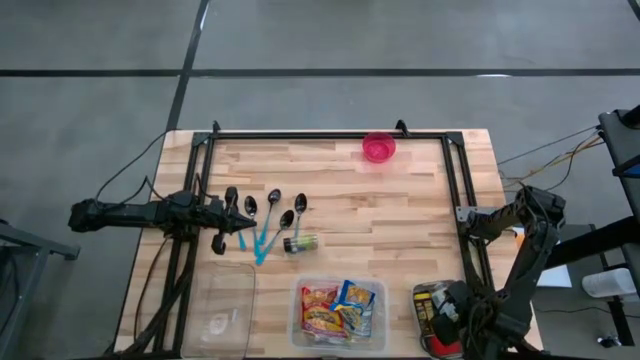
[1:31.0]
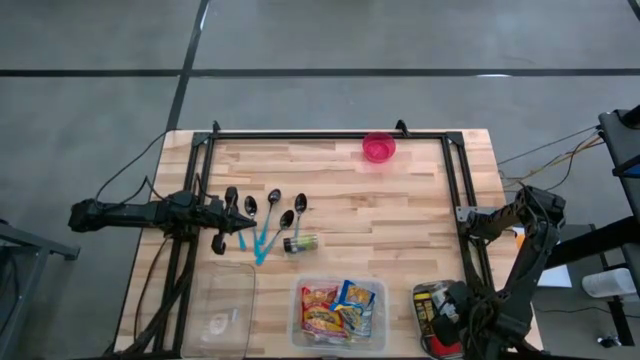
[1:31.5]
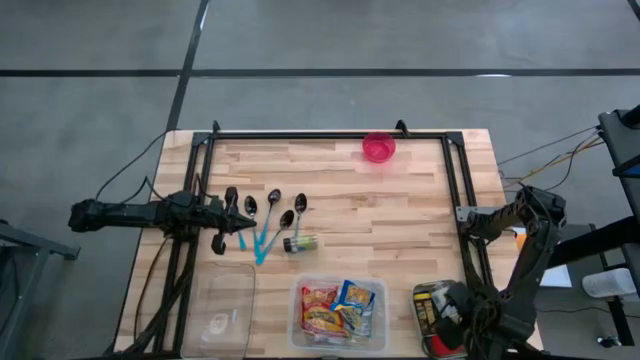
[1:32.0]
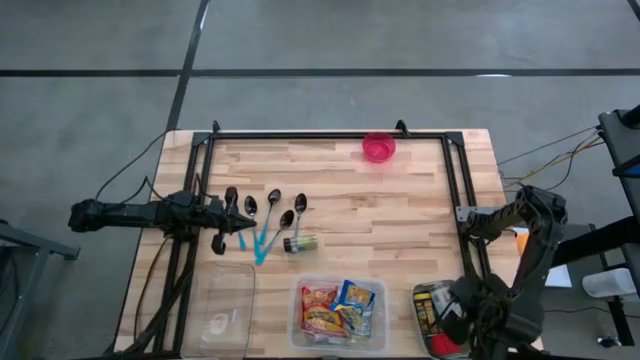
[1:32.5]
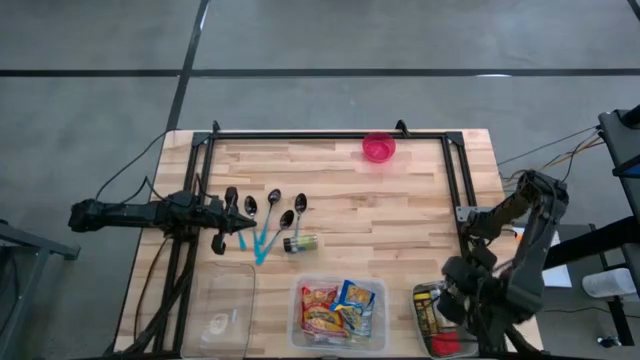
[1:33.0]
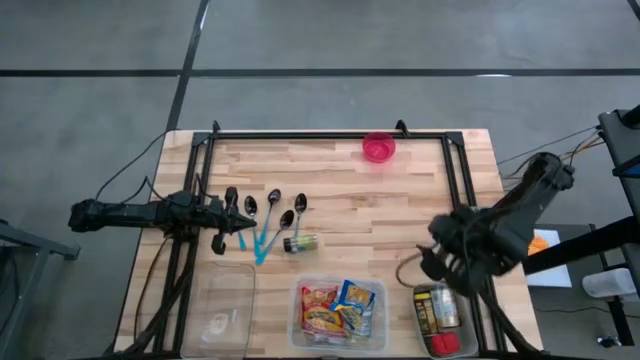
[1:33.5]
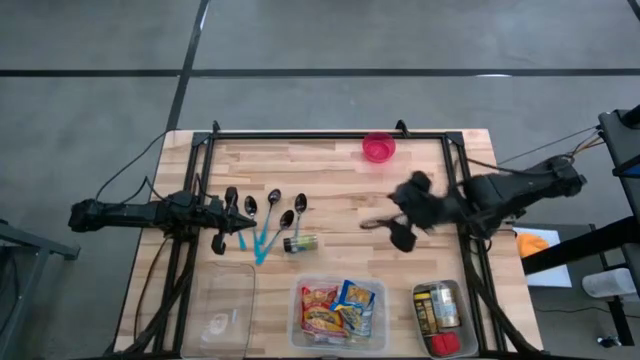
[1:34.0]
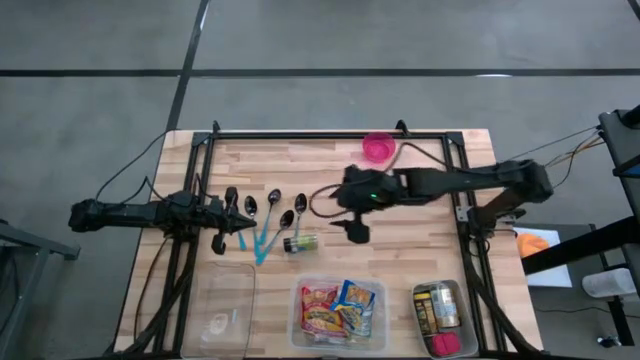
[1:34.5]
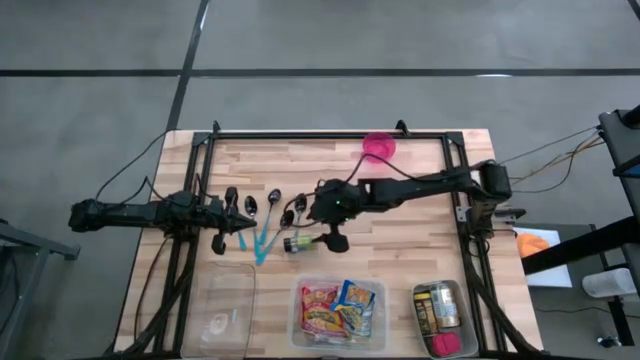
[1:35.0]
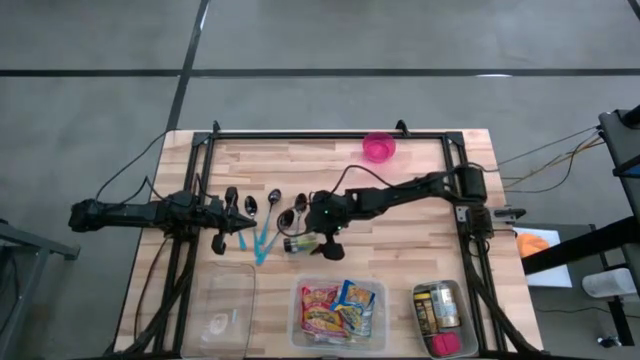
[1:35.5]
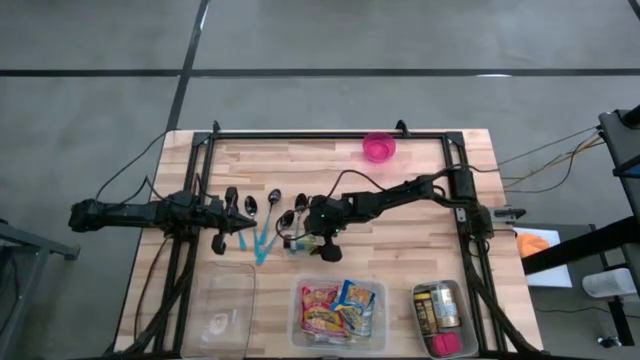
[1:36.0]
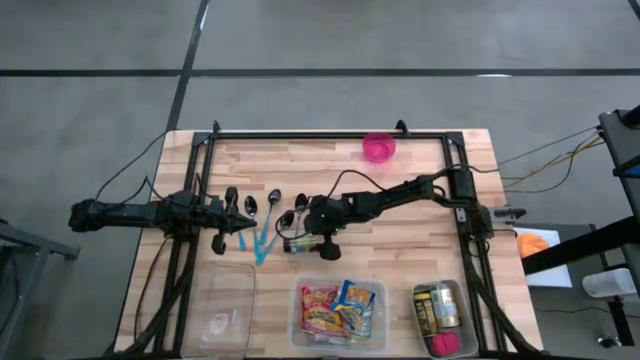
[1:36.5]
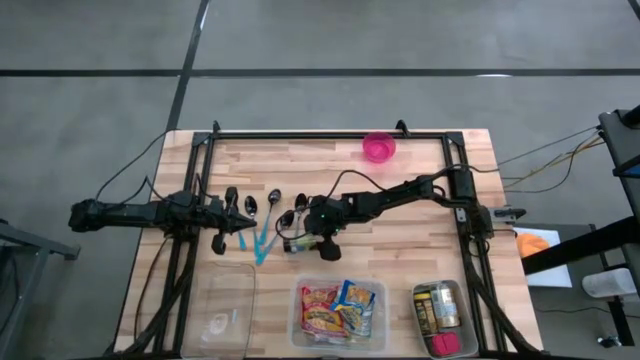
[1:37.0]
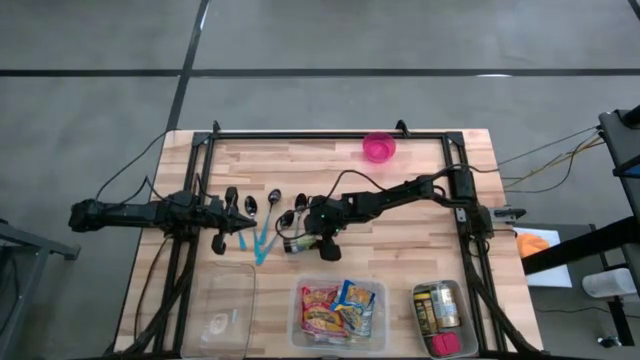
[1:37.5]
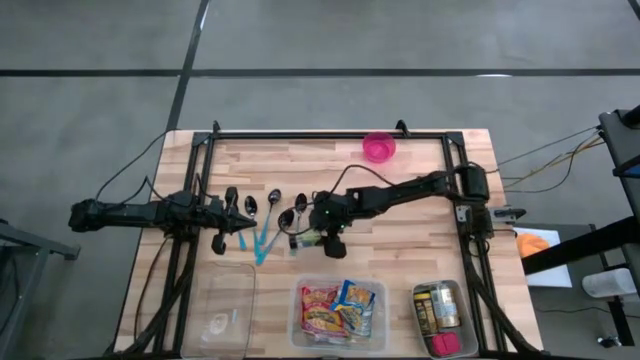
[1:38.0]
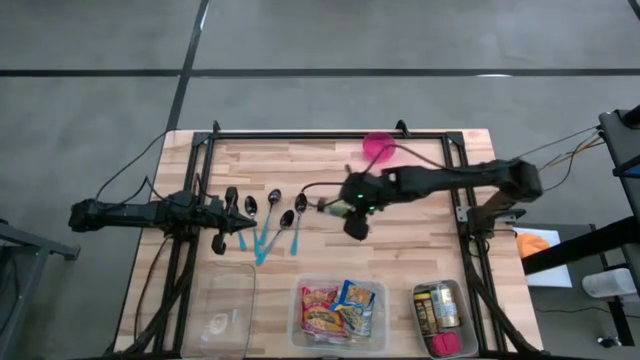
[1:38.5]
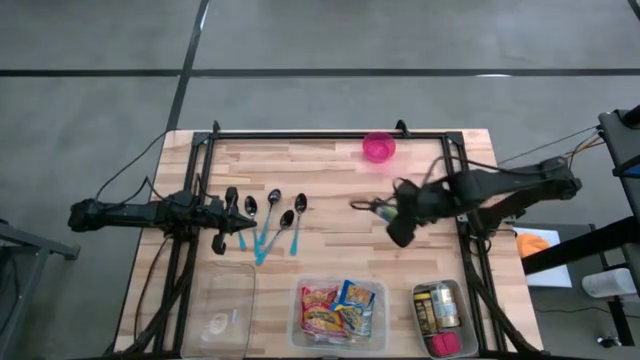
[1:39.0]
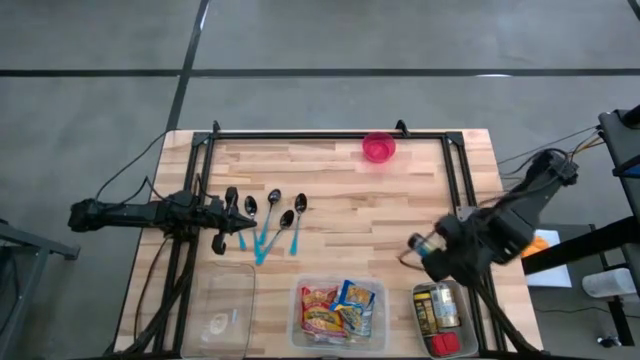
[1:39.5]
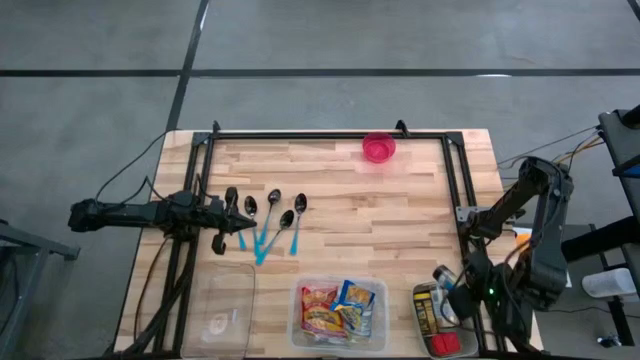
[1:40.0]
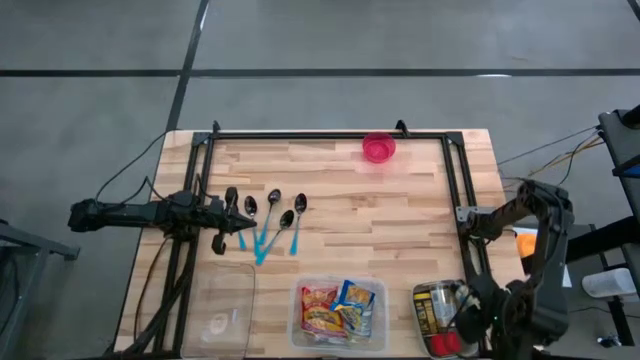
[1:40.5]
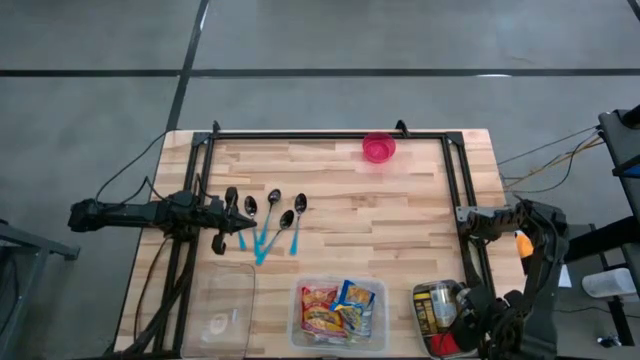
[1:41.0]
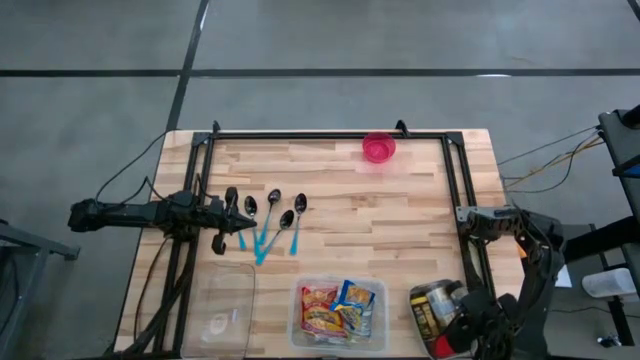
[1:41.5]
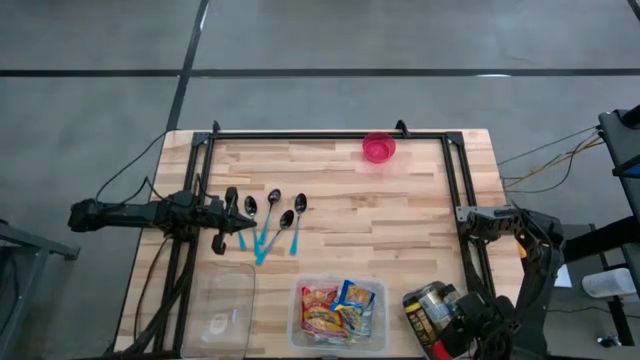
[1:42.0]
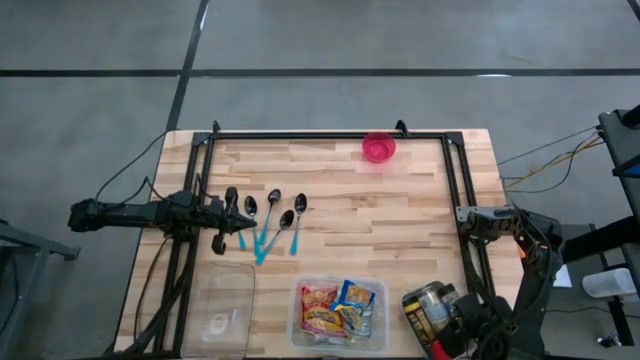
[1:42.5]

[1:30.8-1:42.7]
Put the green seasoning bottle into the gray bin

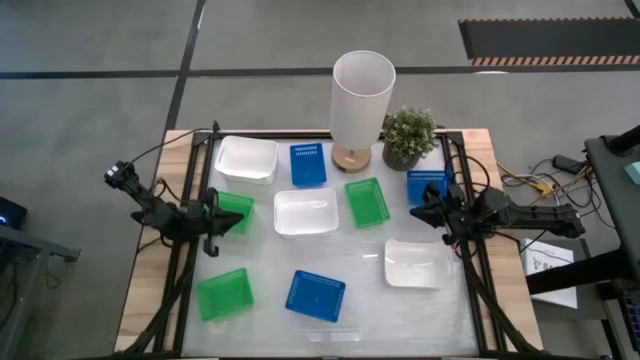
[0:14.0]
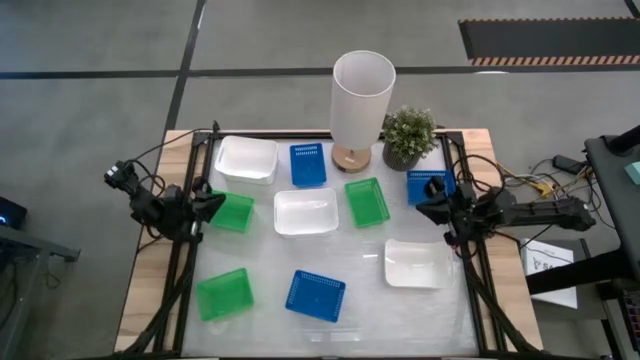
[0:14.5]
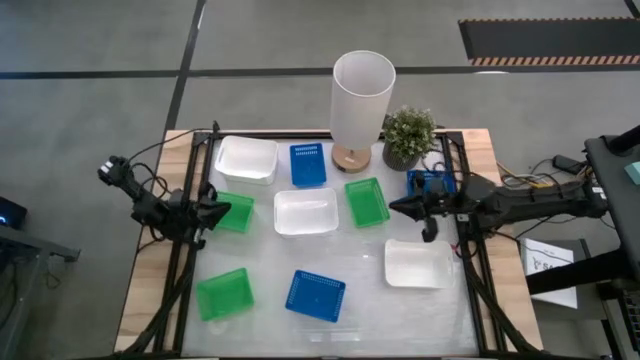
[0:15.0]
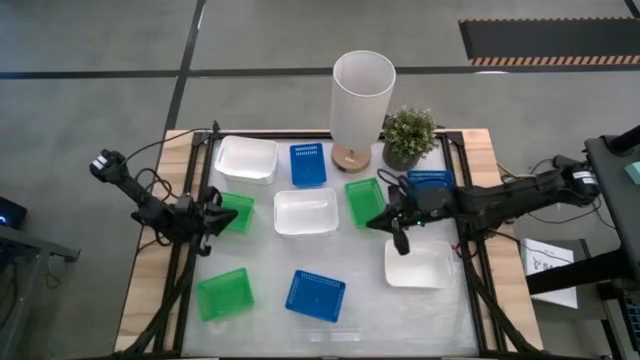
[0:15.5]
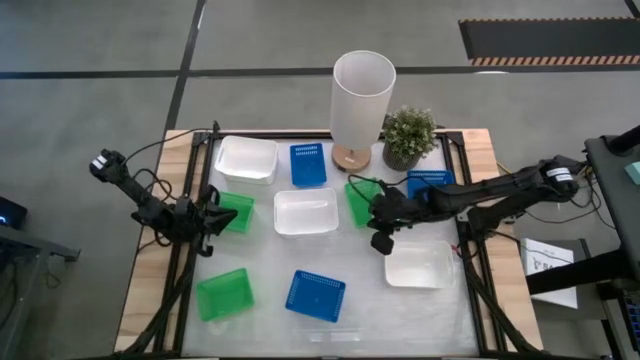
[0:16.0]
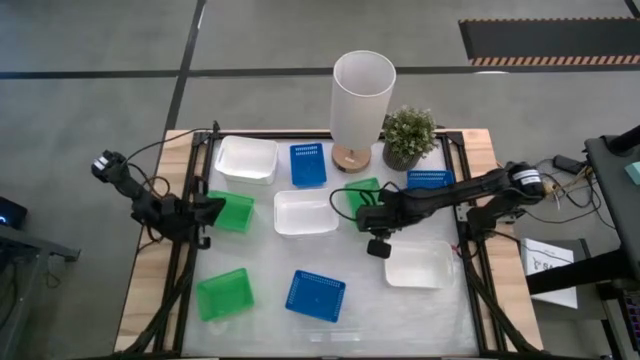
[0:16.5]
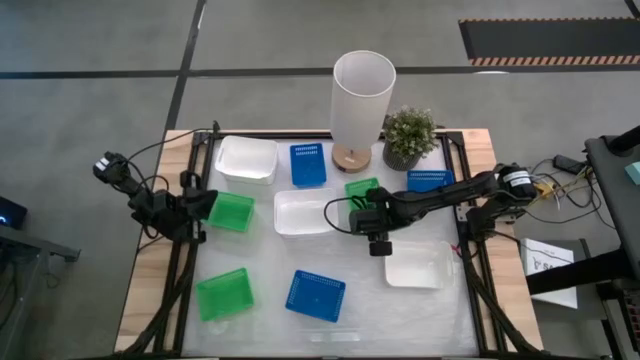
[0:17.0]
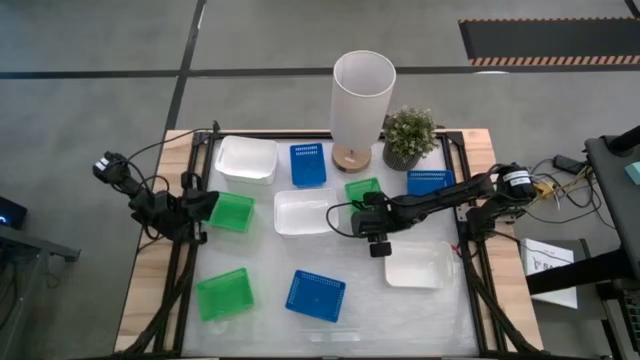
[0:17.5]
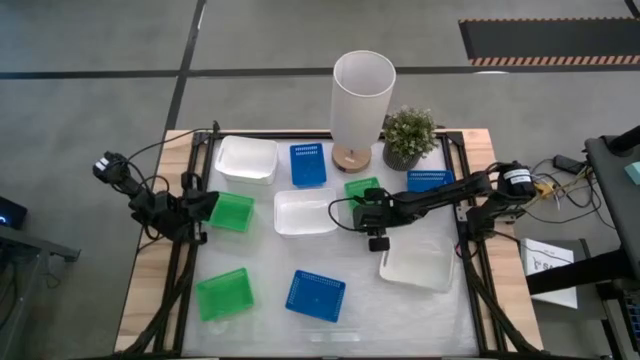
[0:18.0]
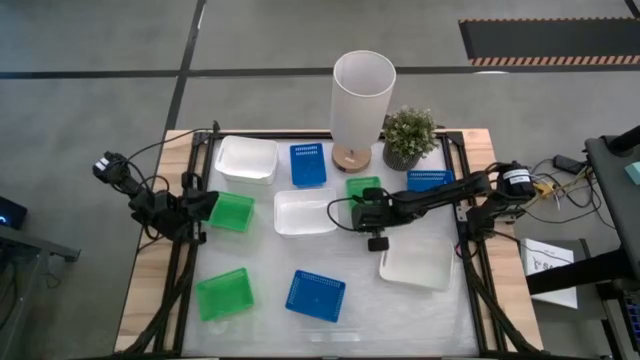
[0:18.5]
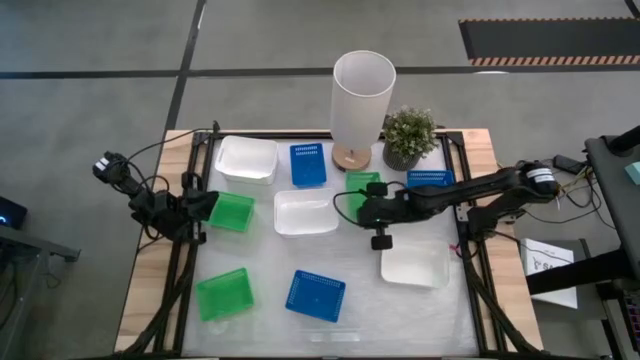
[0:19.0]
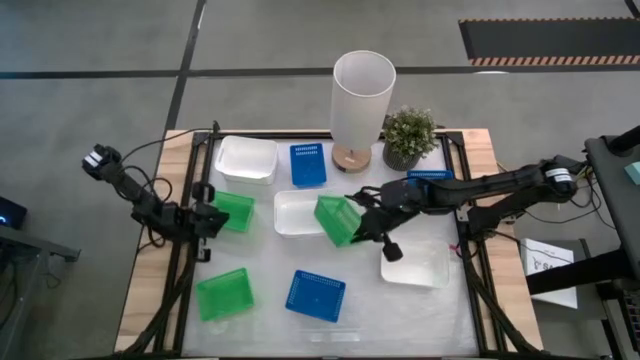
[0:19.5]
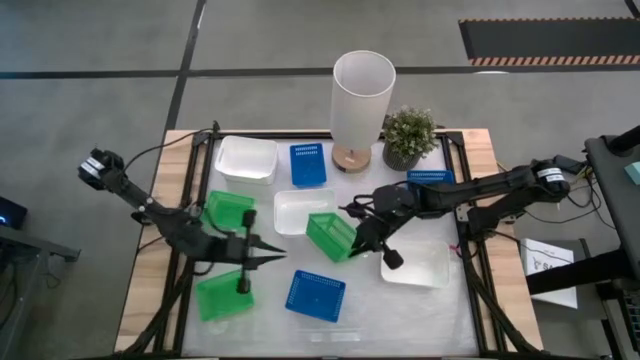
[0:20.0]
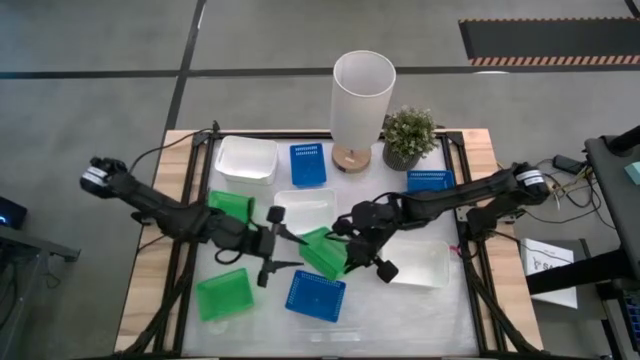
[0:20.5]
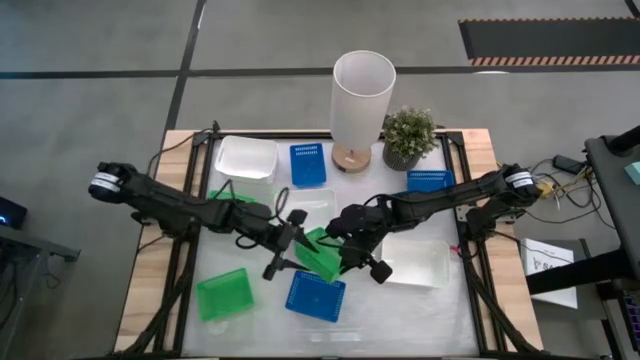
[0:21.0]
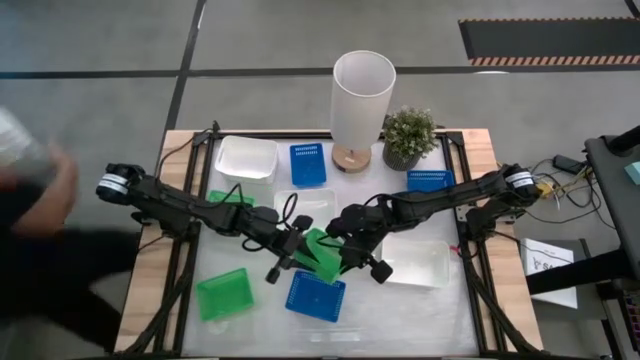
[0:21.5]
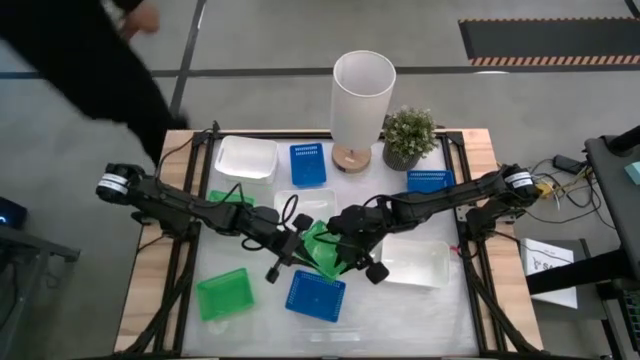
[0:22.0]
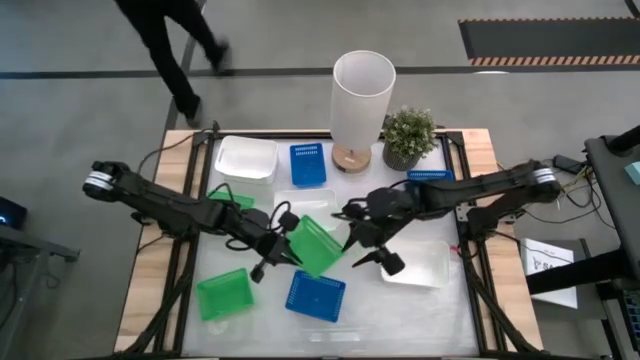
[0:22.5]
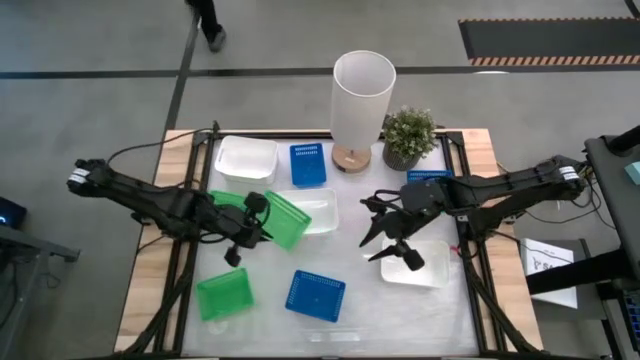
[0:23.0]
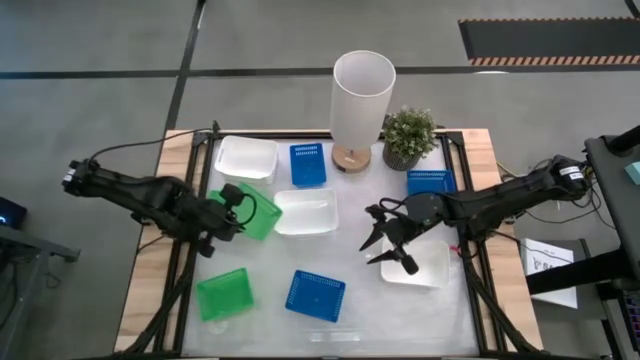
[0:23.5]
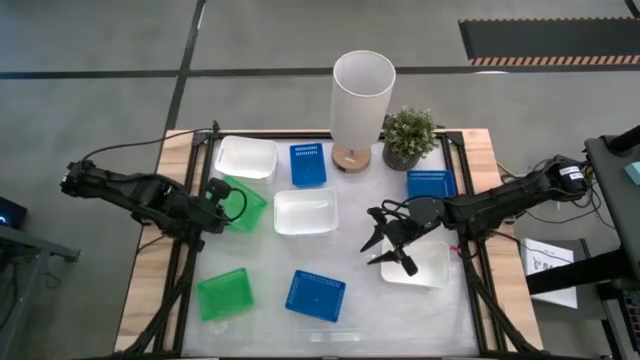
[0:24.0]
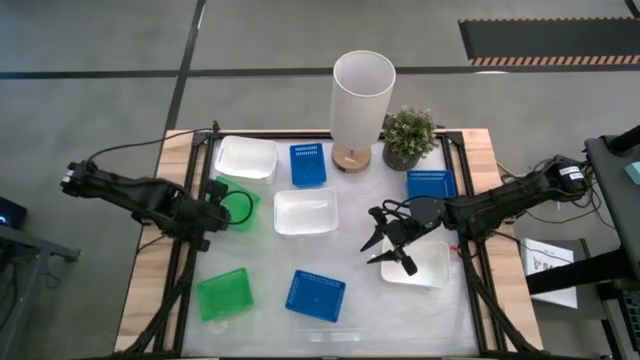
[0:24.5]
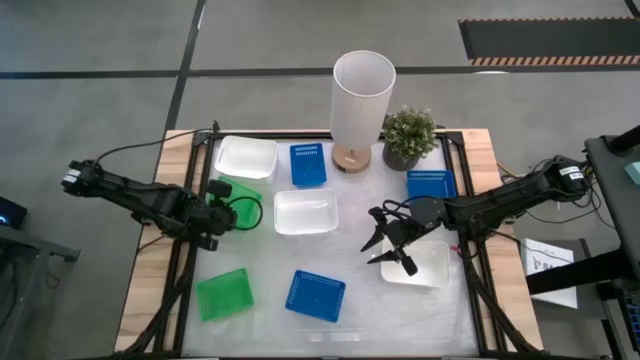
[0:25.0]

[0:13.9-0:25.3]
Stack the right green bin on the left green bin
